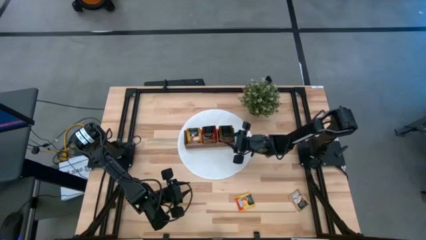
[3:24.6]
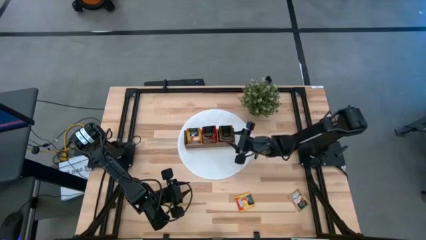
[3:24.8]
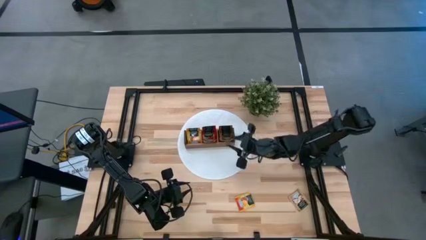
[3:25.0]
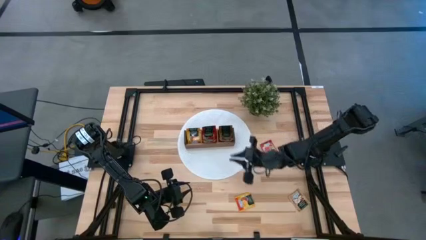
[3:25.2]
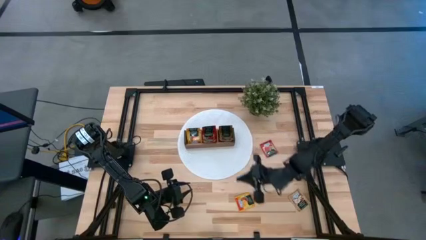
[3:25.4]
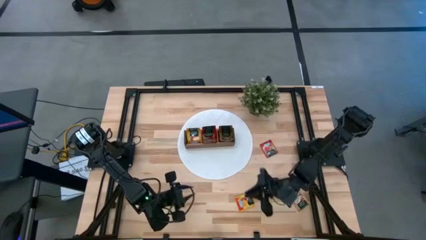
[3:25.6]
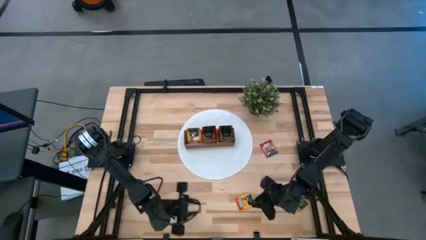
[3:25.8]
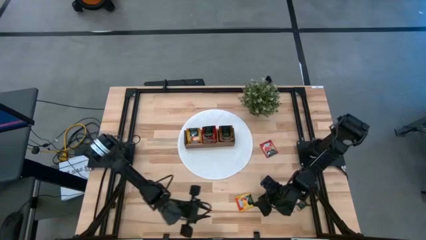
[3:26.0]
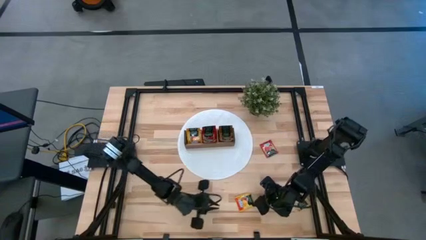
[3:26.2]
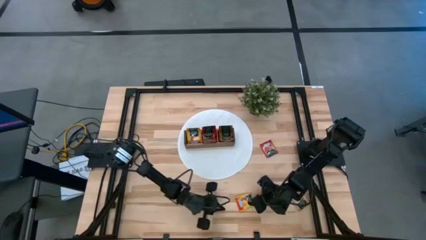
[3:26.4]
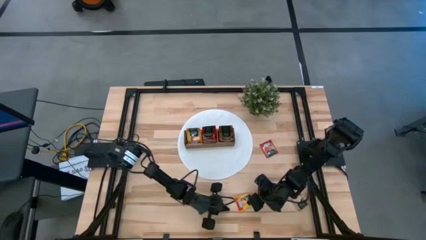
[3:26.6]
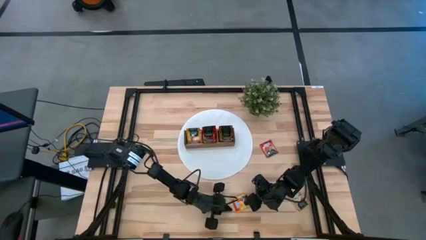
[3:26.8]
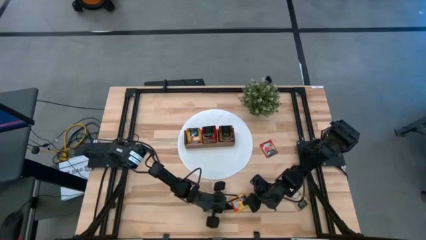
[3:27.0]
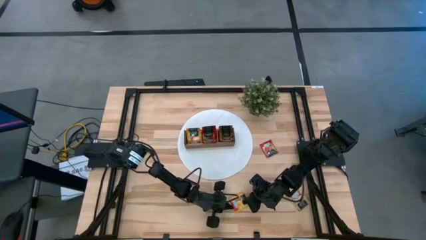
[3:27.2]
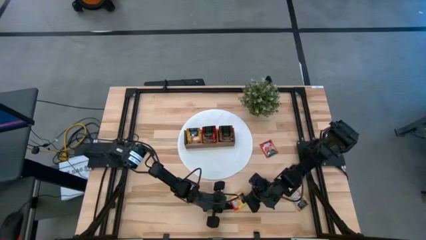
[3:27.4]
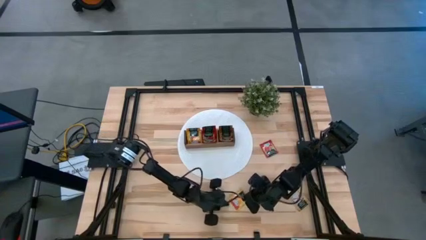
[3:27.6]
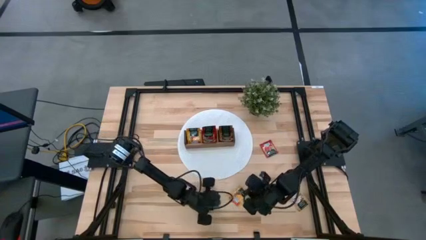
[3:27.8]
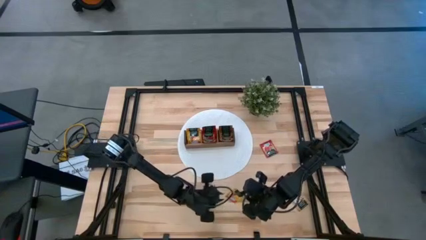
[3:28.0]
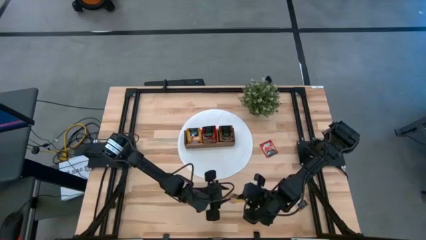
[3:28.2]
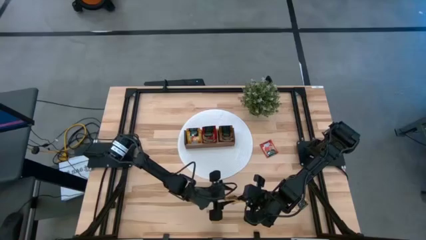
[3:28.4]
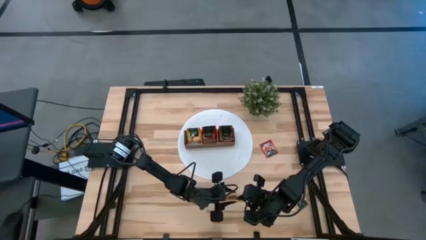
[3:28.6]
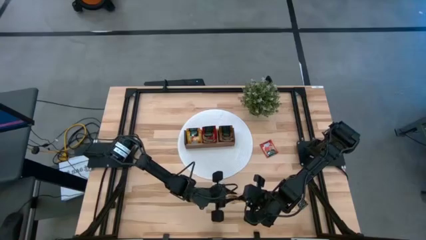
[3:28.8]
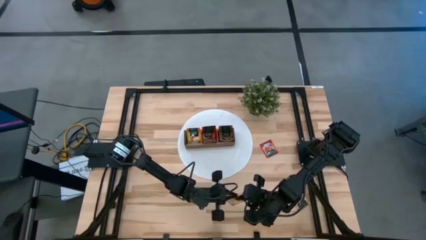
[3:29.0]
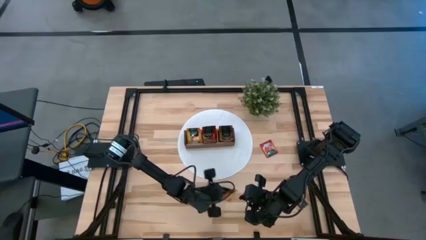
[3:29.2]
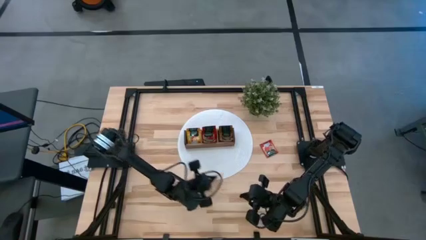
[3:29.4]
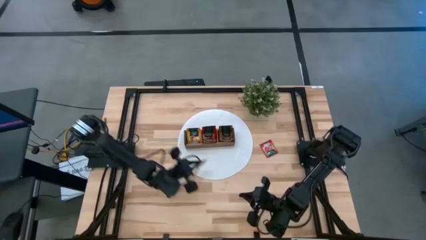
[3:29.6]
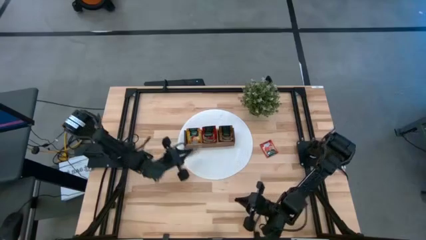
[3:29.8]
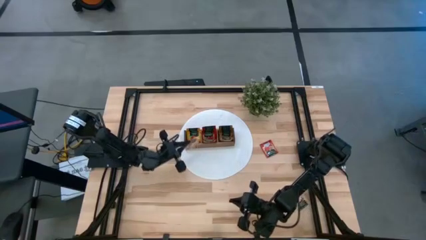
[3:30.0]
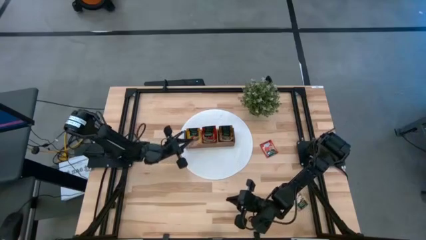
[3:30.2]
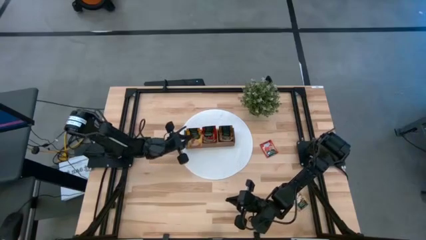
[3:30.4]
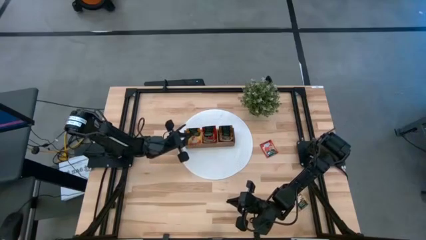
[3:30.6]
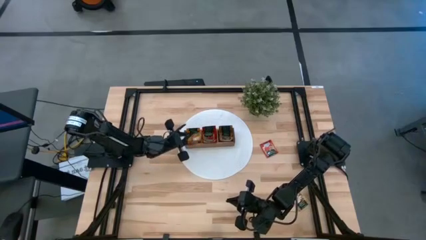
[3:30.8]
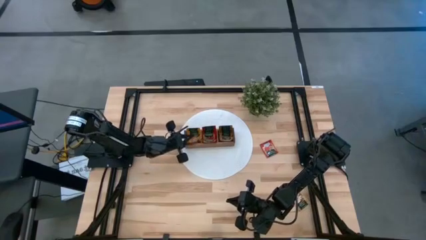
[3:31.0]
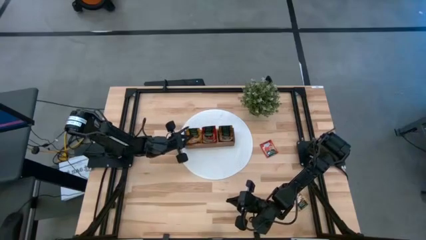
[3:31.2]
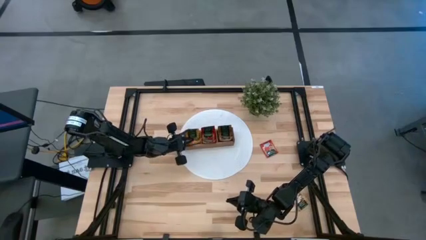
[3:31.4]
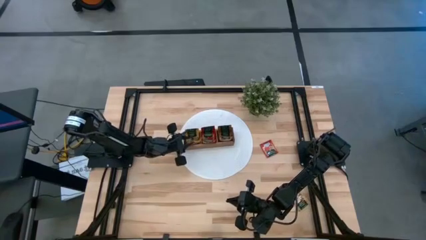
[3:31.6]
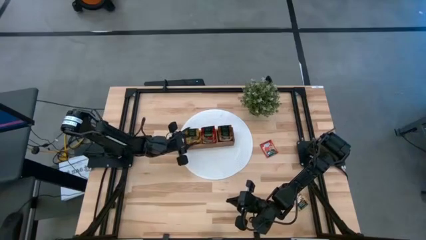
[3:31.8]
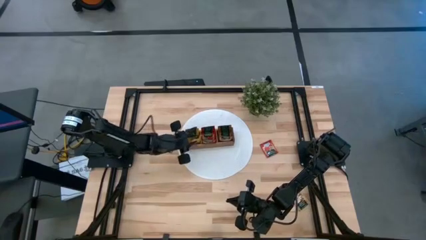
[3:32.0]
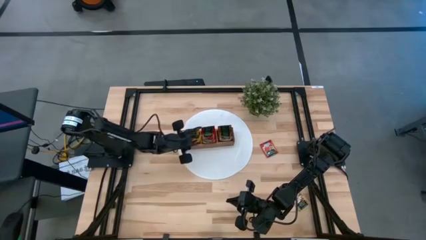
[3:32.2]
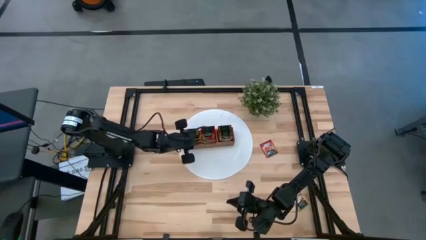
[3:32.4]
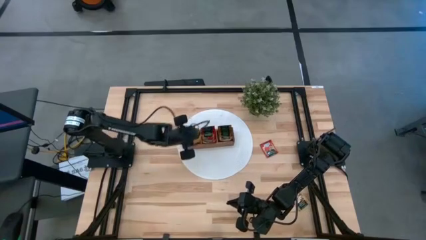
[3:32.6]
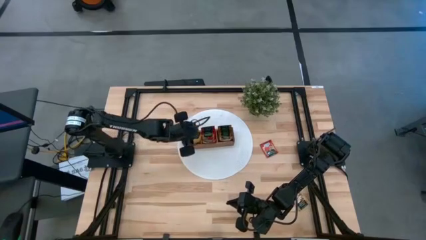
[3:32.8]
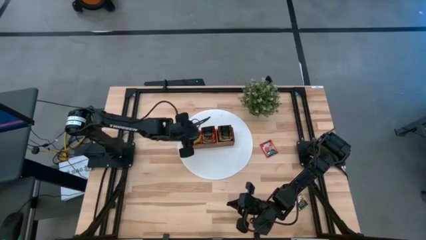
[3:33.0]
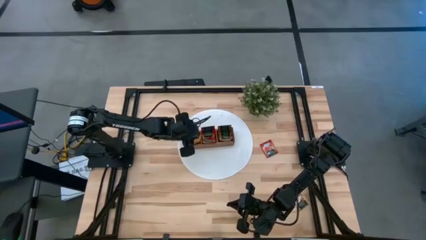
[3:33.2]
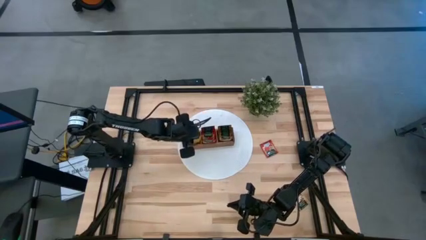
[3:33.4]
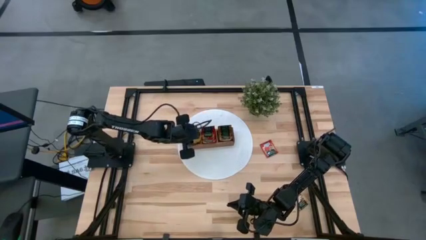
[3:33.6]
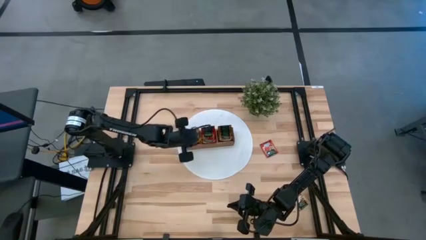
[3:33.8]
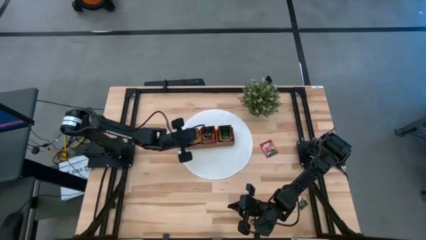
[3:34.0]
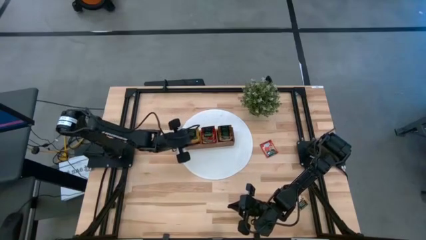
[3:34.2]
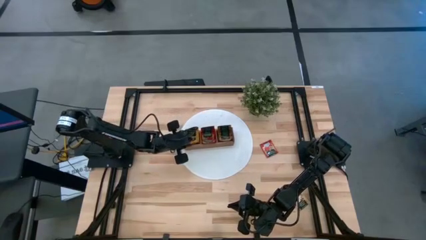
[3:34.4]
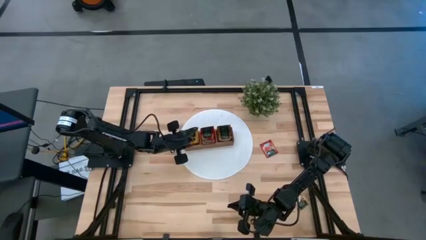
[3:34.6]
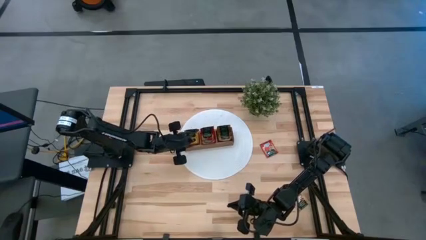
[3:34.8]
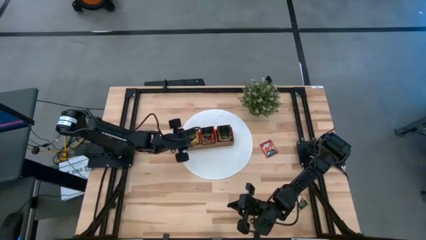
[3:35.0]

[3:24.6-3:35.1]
Task: Pick & Place Tea
Put the orange tea bag into the left section of the wooden organizer

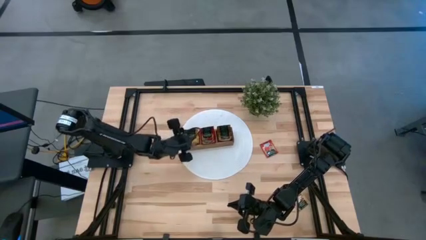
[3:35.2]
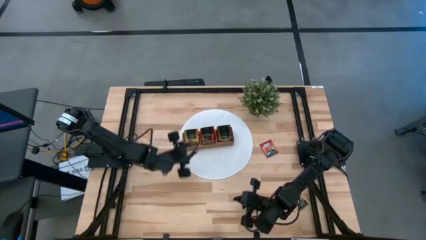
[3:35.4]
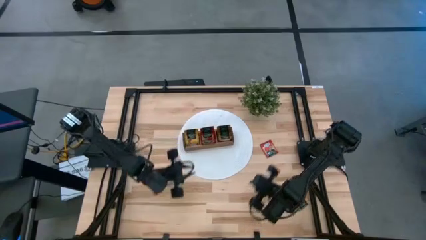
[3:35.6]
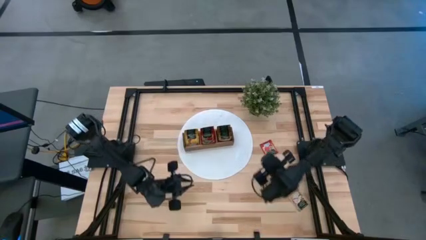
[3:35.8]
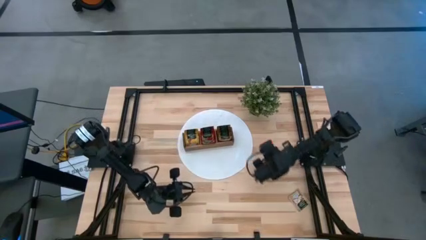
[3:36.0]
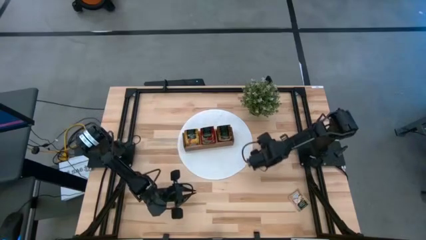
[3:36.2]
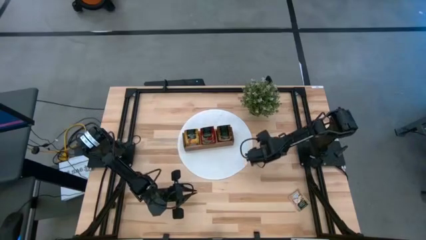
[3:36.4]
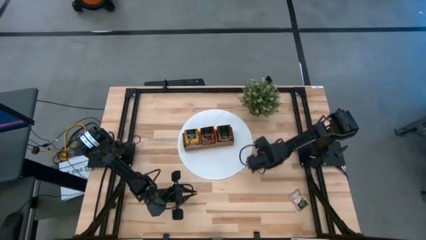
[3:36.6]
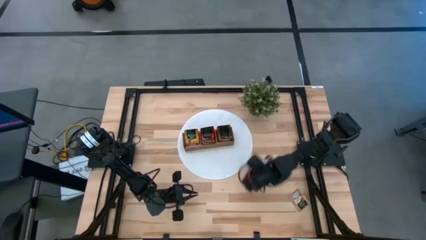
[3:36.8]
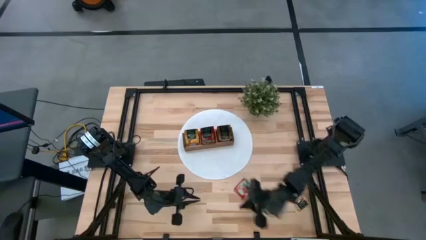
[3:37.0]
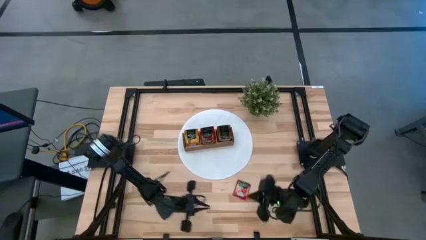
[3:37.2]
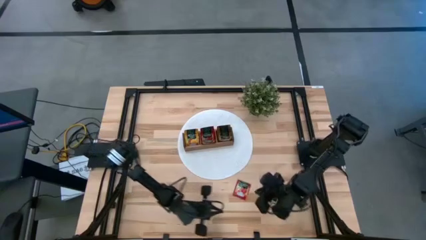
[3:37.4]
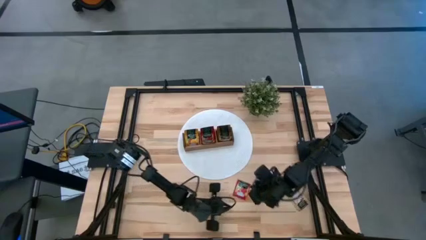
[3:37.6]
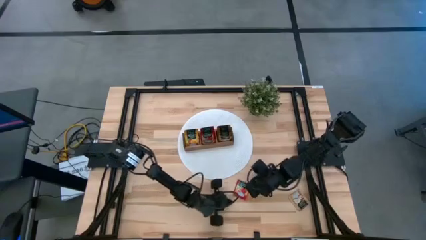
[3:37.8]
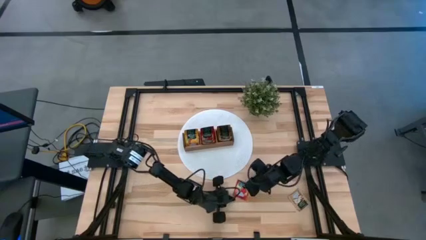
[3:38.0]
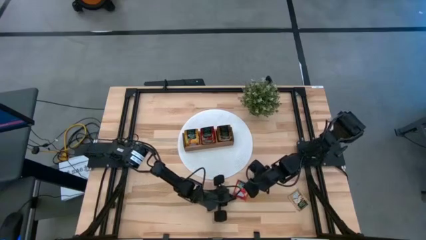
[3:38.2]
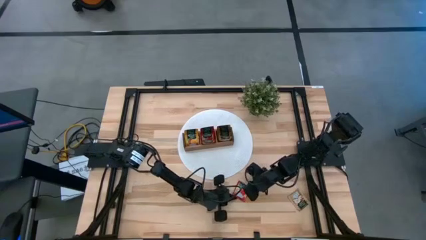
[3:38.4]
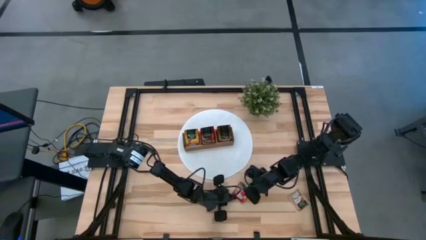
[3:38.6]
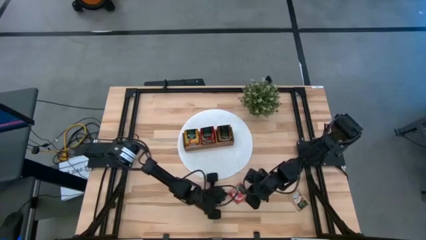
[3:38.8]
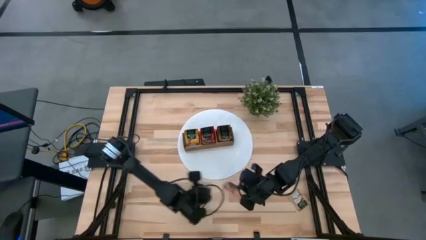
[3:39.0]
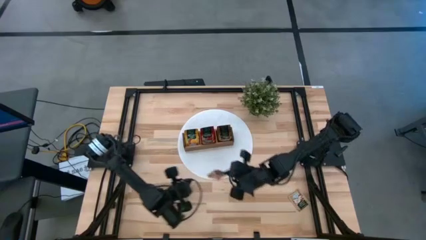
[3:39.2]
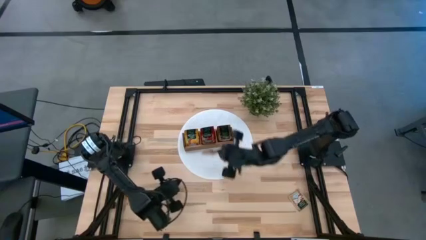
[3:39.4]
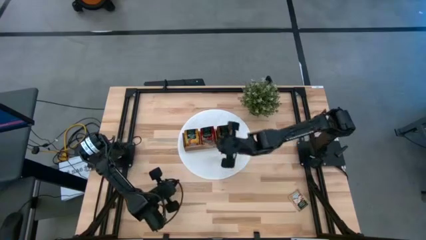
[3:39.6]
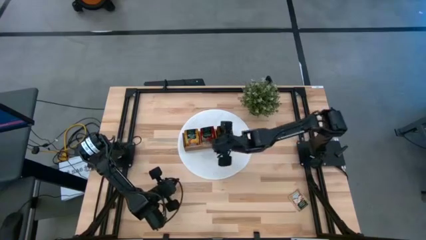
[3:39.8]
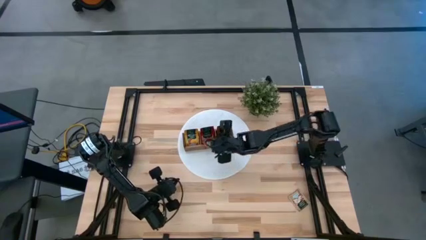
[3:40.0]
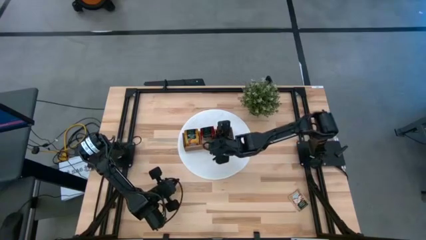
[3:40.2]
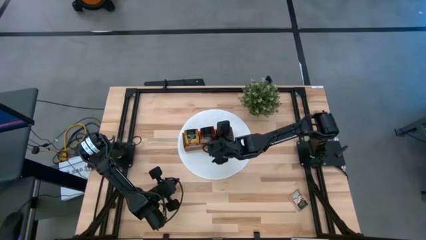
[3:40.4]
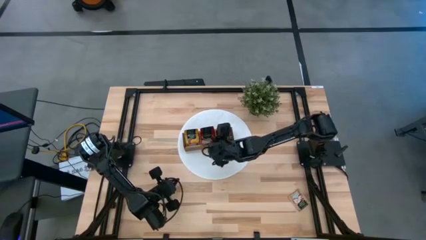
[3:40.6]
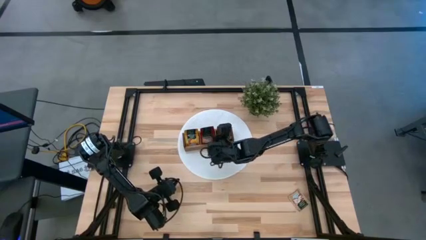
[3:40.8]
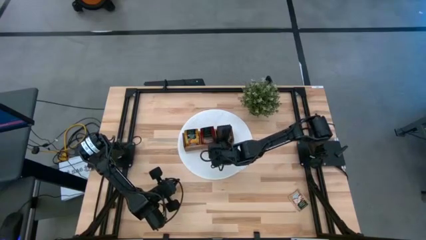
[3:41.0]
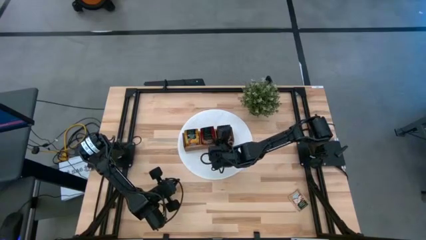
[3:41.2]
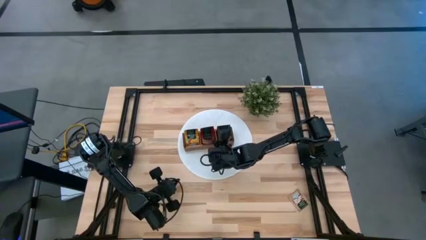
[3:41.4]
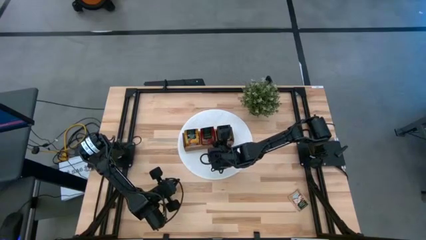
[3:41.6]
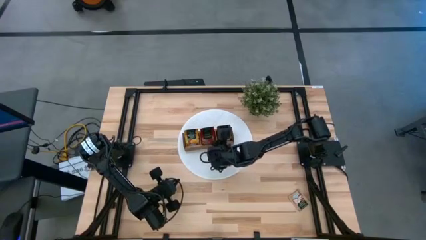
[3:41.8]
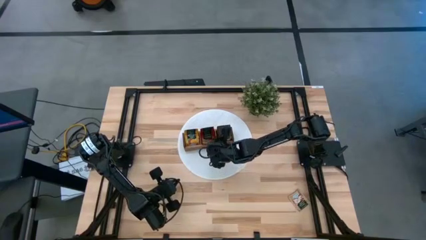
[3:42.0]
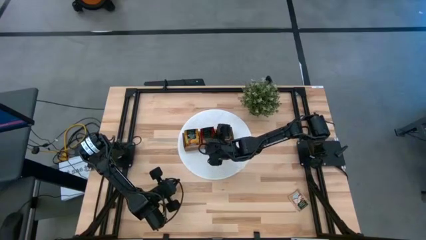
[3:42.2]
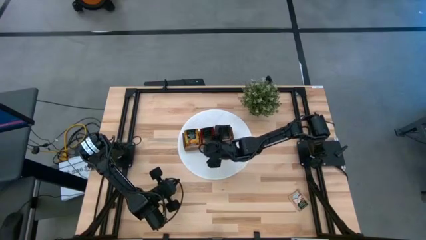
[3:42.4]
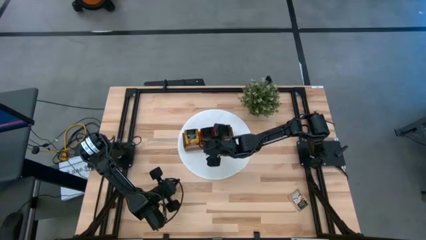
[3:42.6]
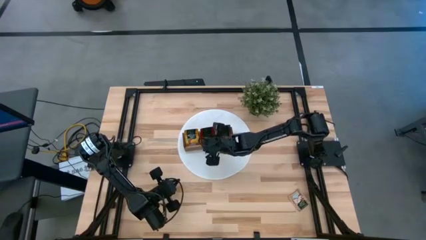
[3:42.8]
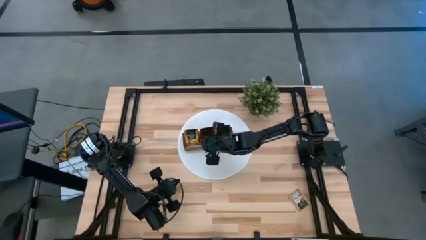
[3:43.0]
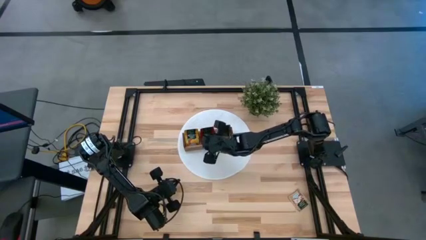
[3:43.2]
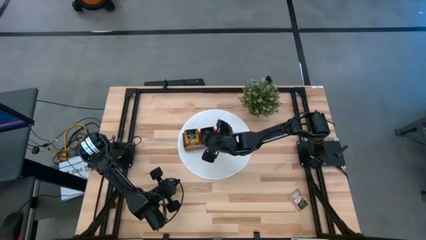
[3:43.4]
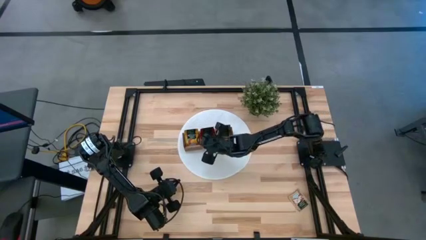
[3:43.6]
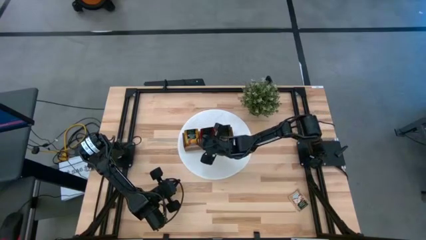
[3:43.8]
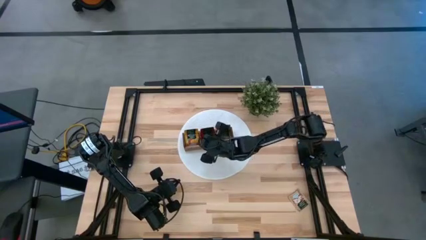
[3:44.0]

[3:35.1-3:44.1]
Put the red tea bag into the middle section of the wooden organizer
